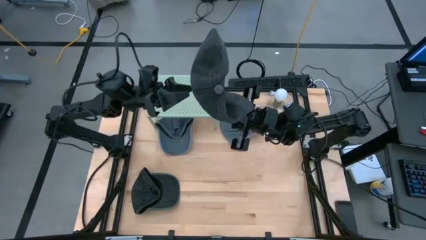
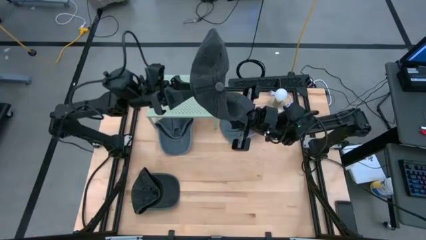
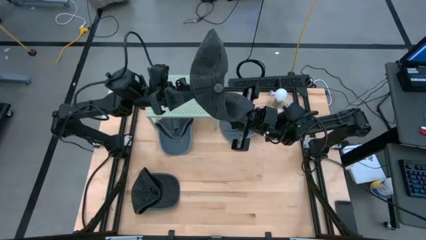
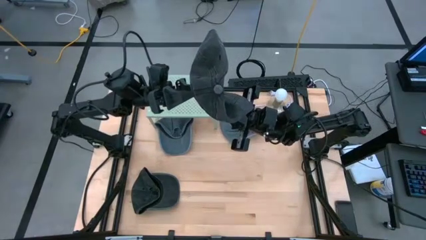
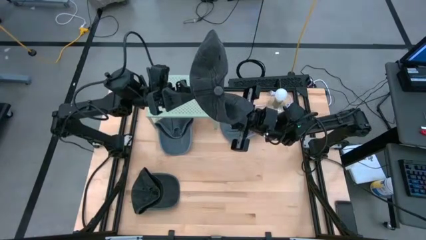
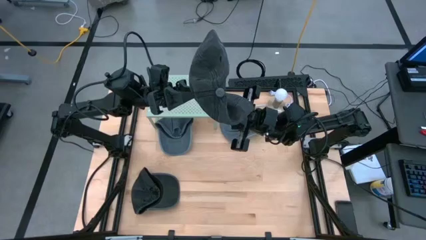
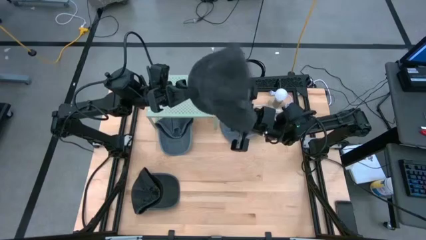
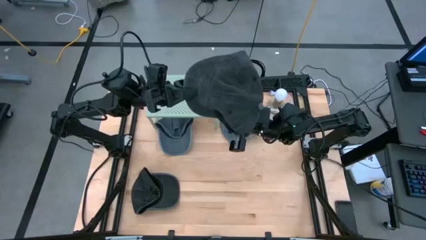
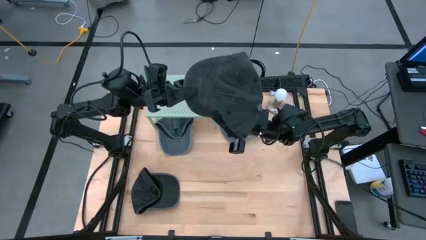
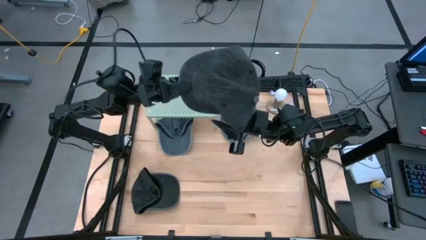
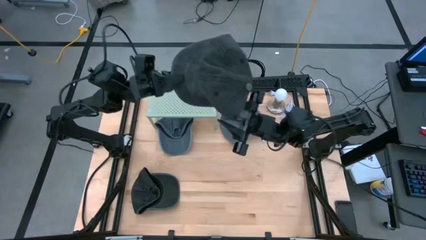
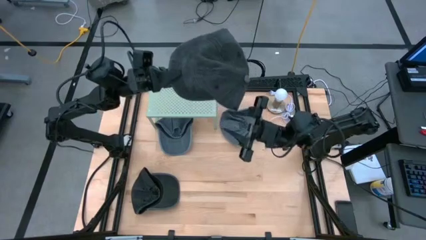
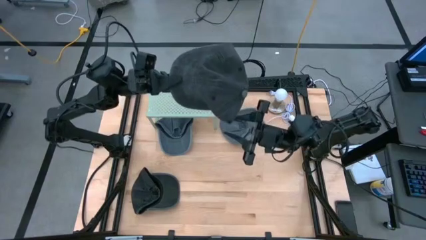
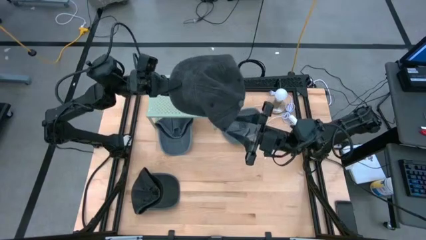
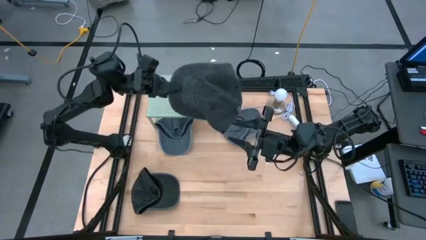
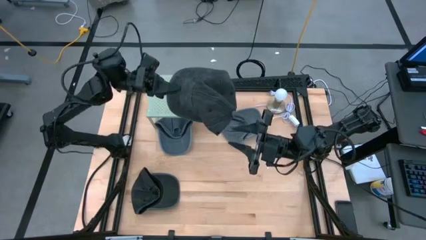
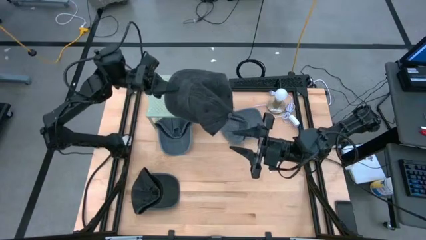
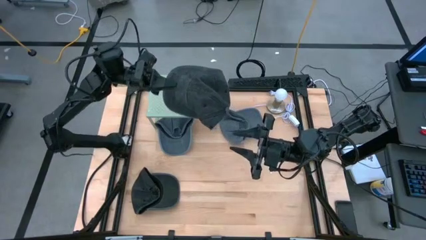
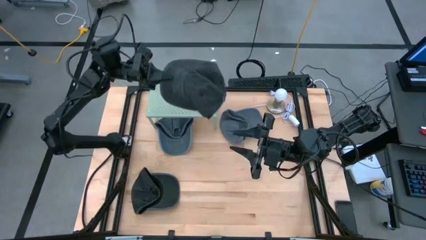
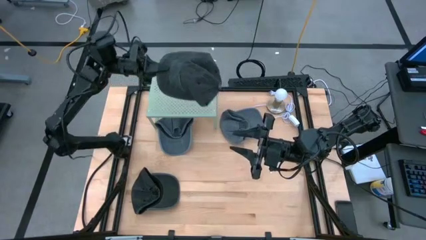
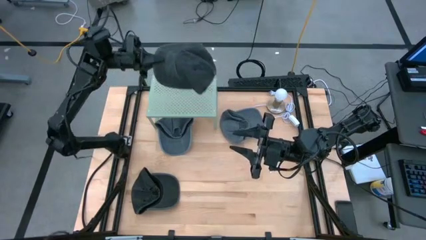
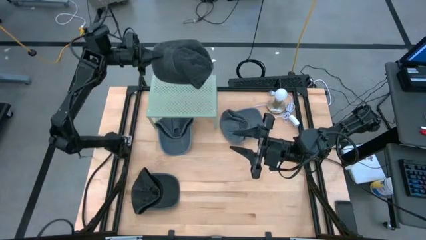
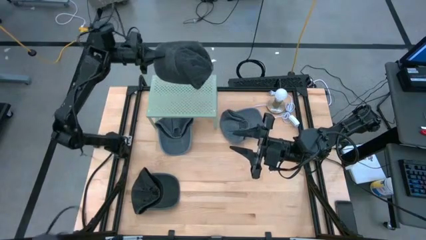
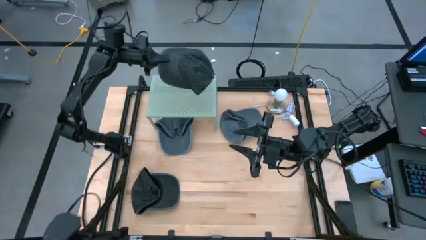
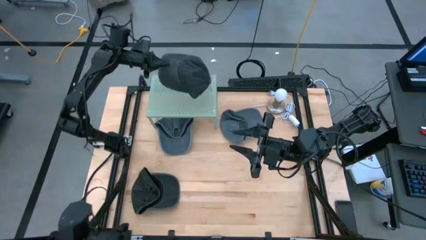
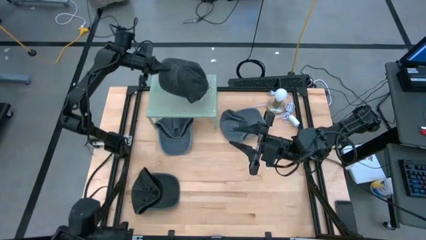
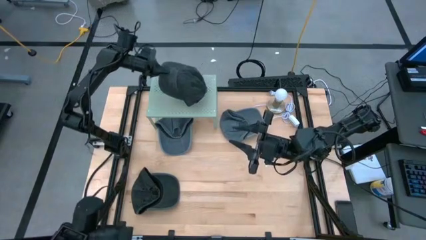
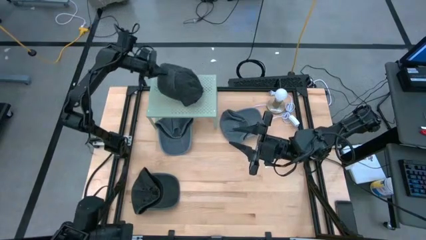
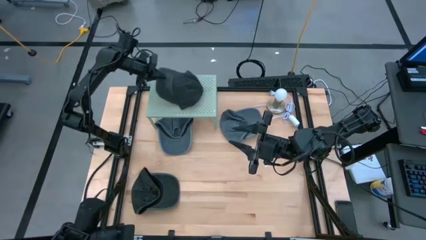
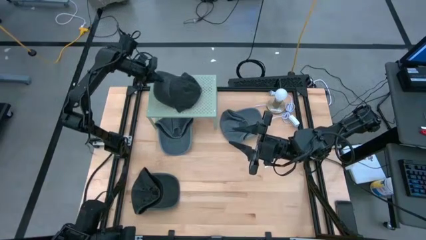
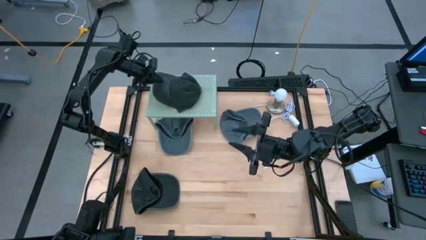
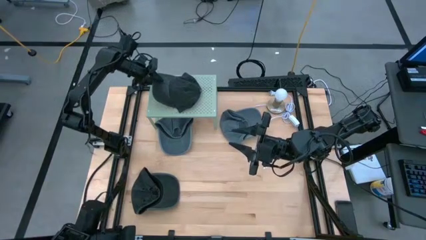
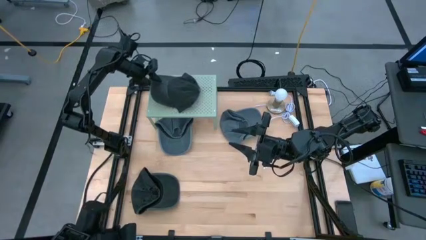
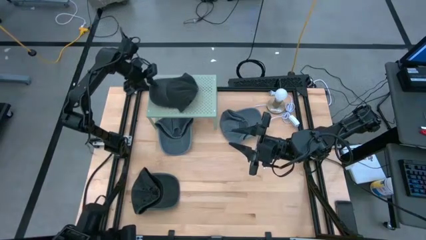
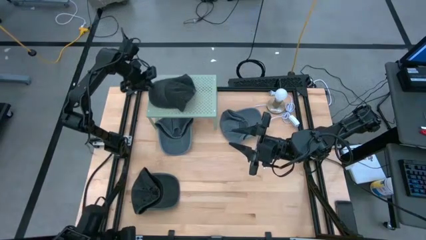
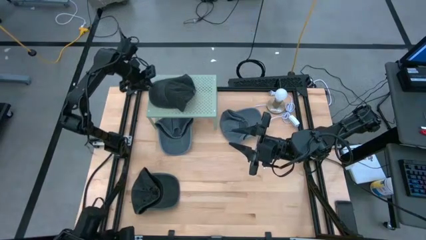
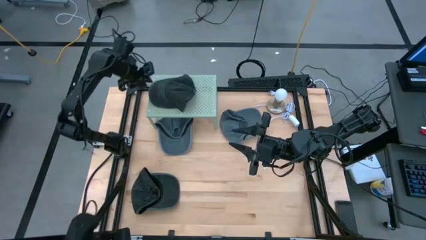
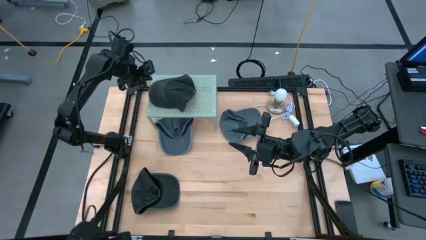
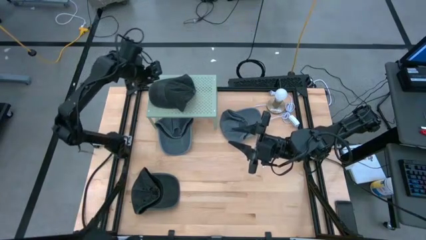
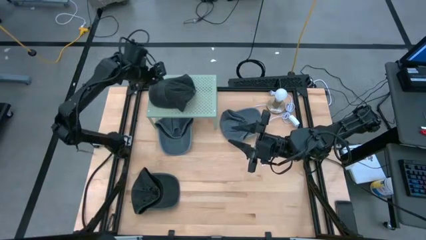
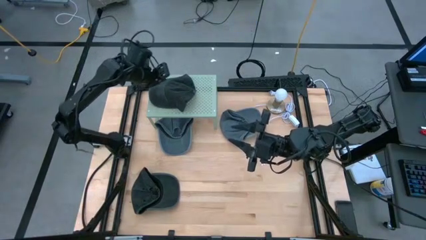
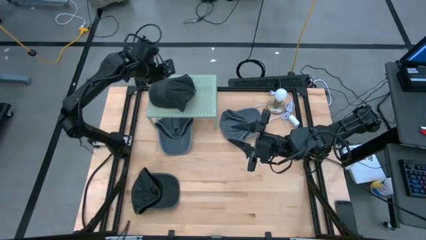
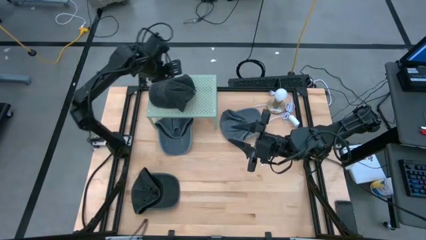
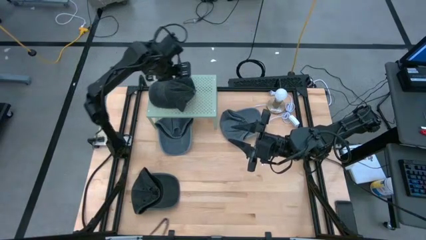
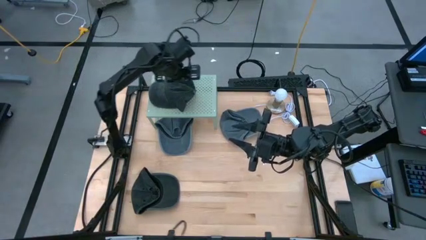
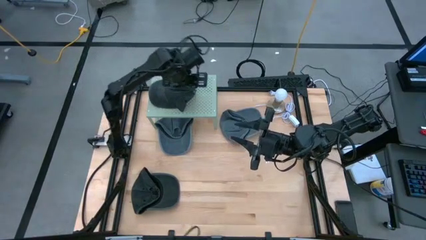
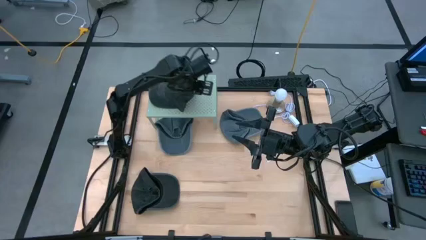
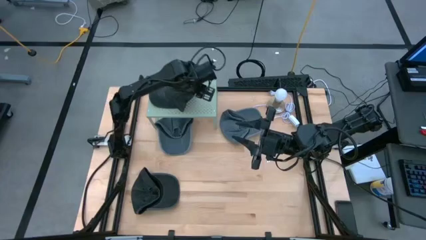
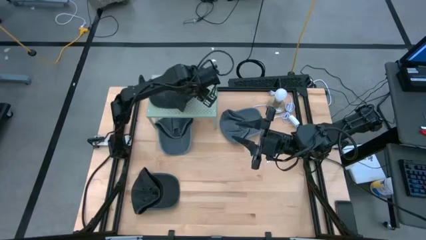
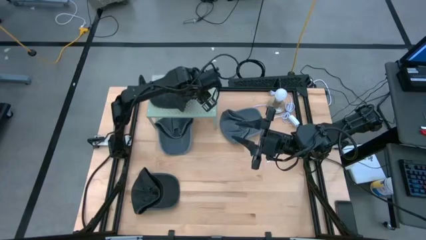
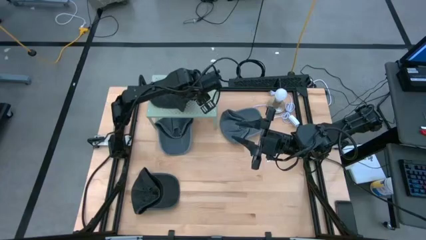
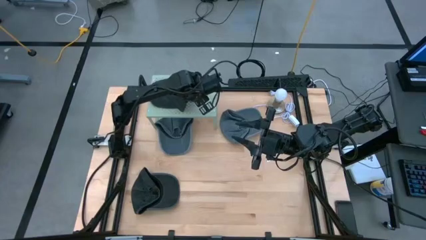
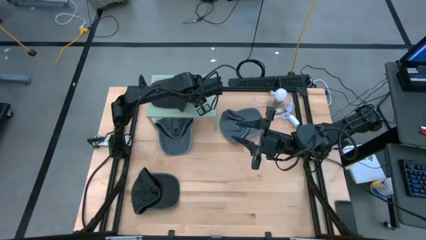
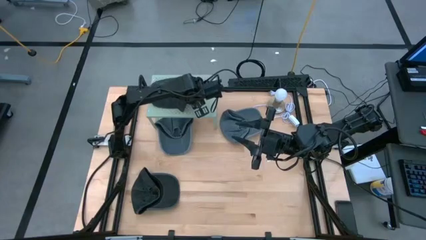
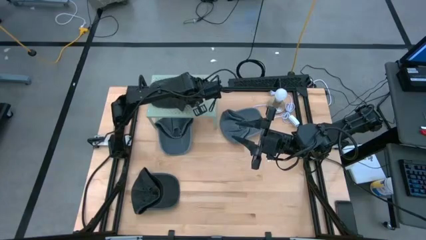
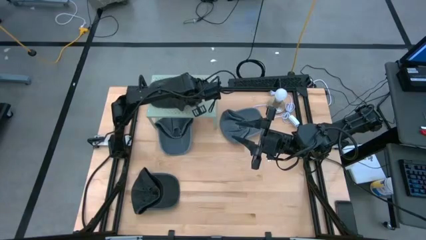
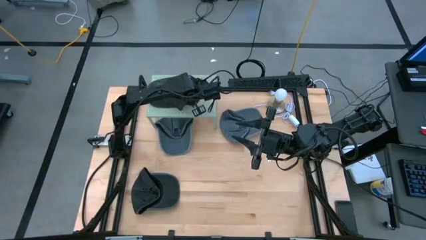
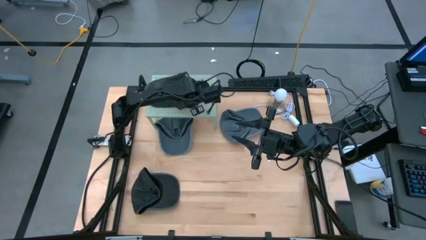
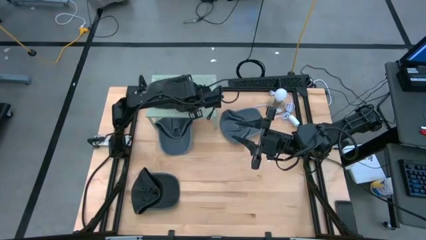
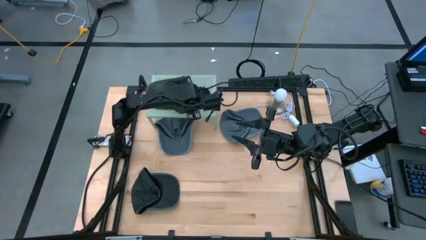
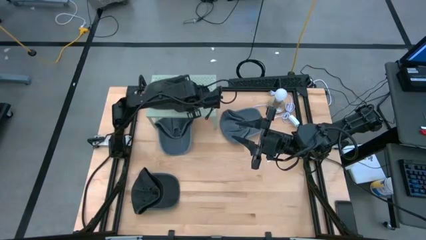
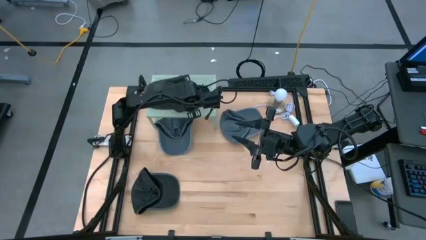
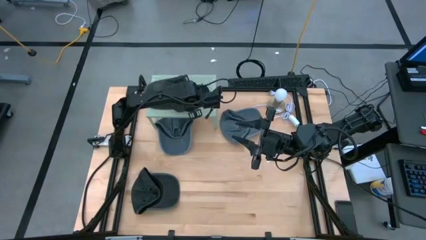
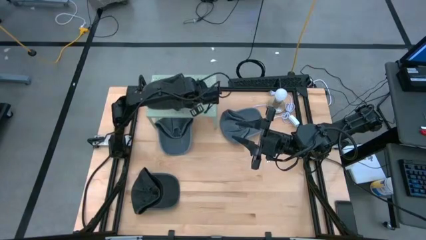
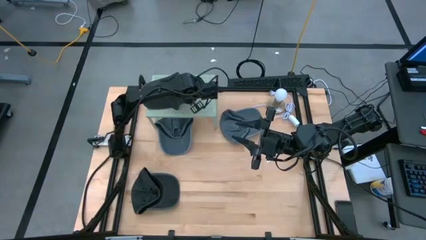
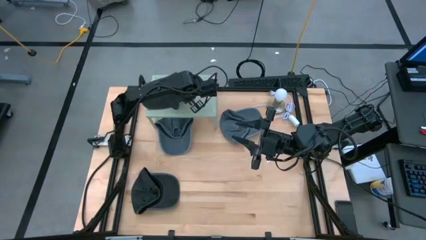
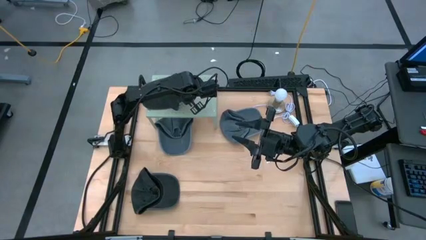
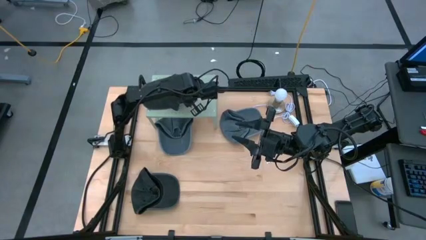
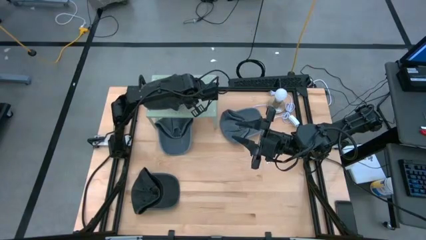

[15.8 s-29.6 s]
Task: Pick & Place hat
Put the black cap on the shelf

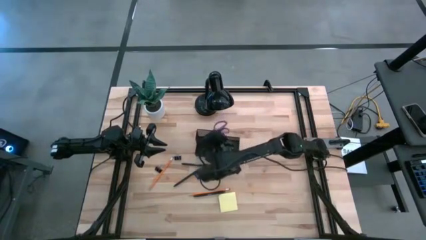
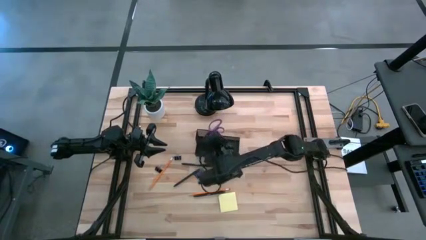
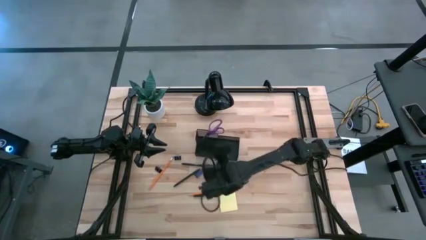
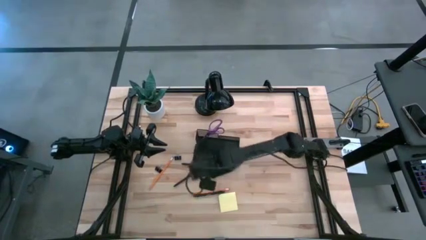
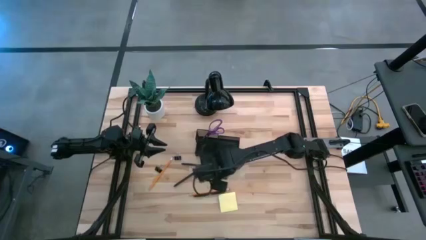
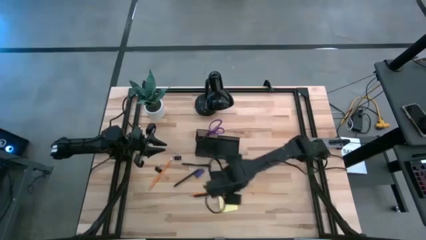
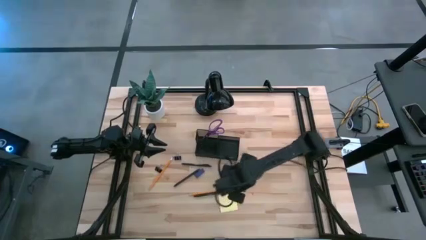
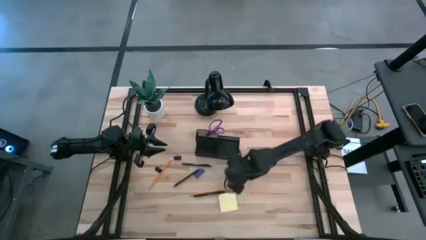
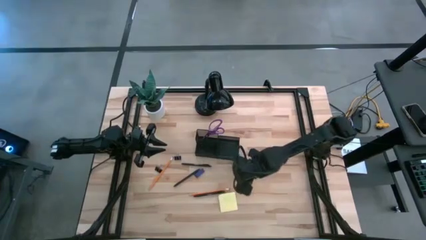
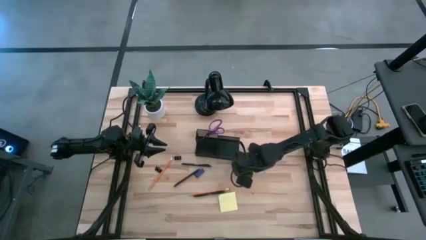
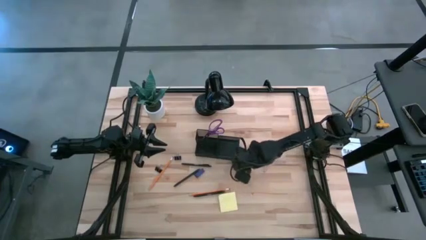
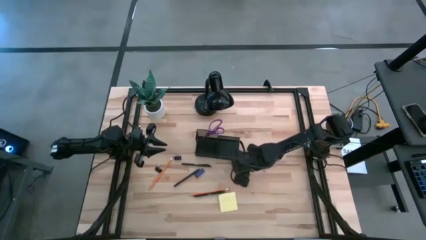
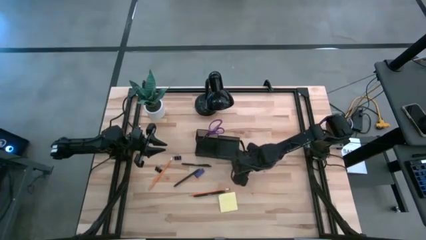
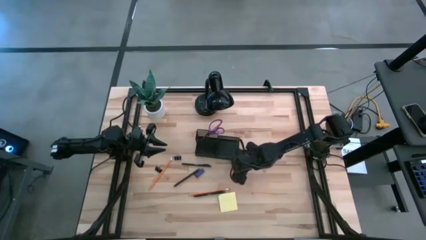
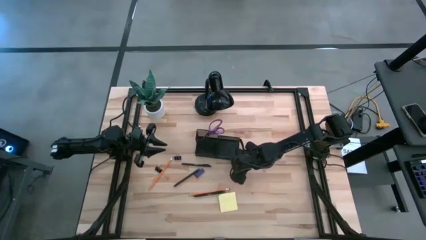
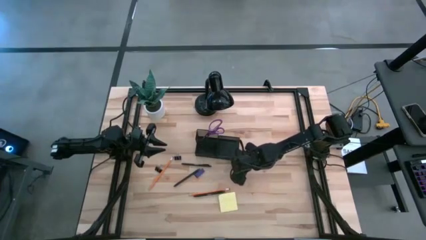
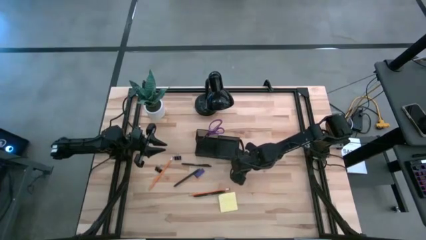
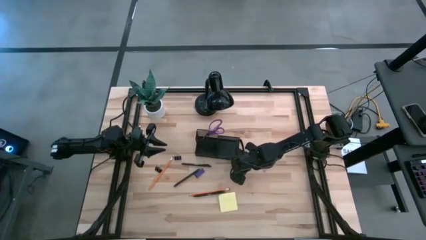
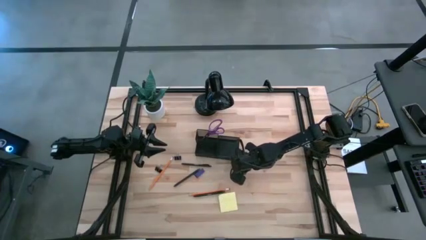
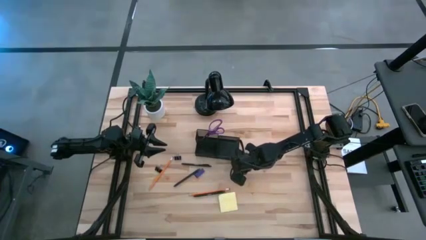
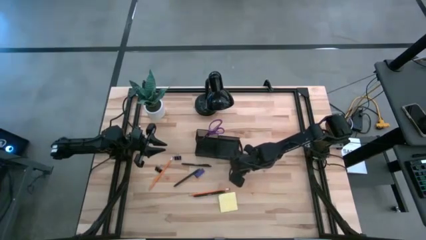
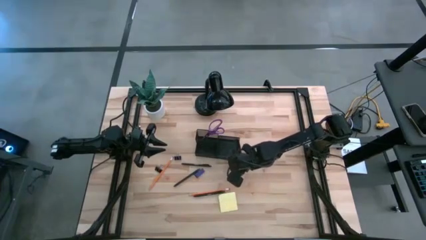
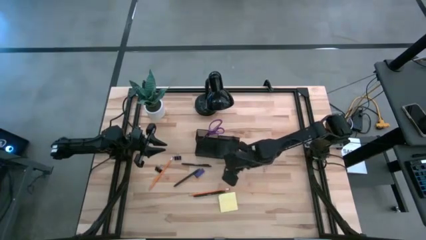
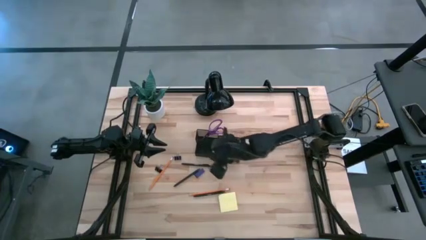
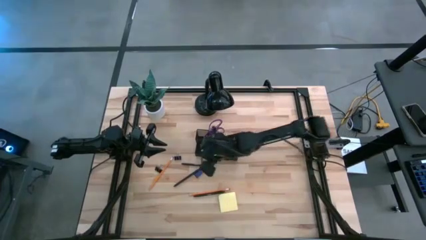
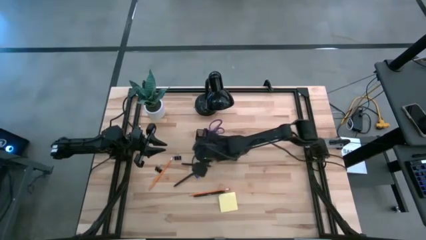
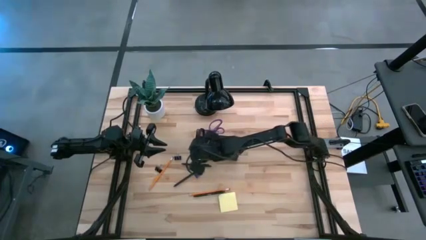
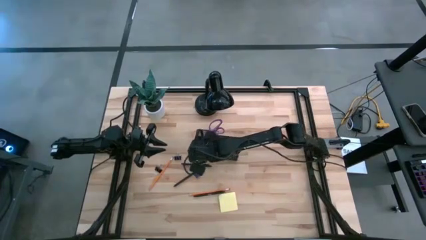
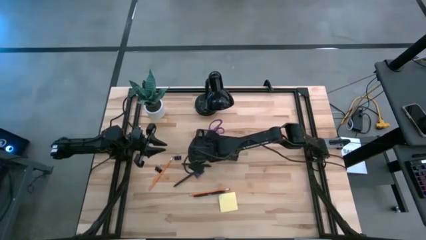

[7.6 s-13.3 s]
Task: Pick and place office supplies into organizer
Put the right black binder clip into the black desk organizer
